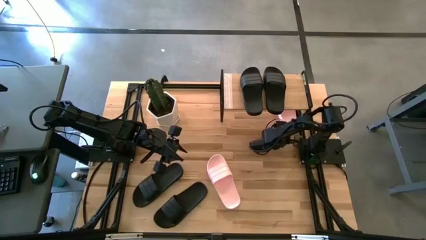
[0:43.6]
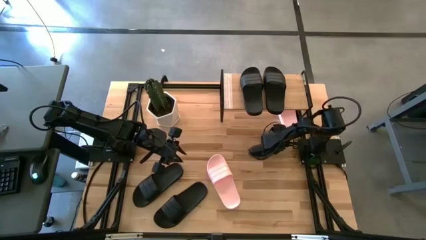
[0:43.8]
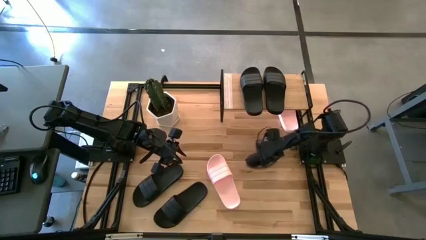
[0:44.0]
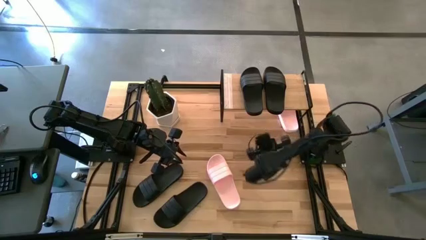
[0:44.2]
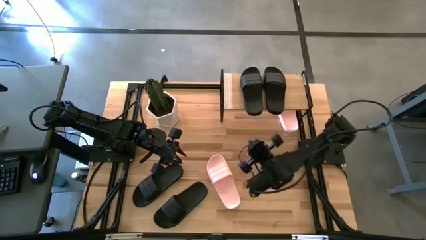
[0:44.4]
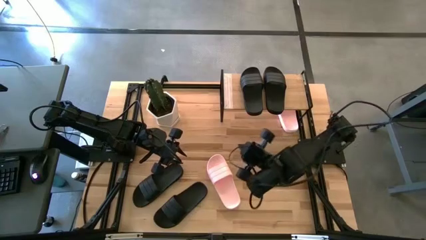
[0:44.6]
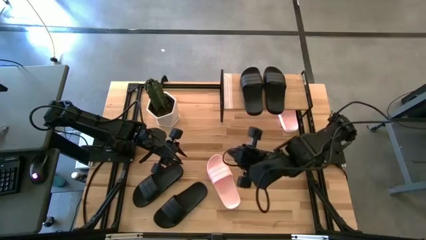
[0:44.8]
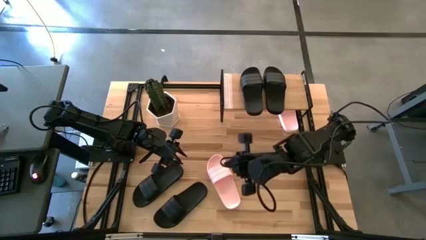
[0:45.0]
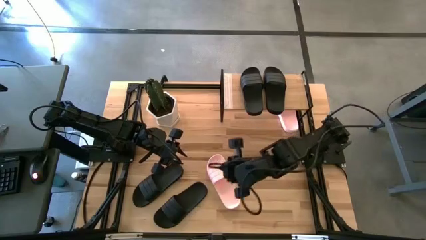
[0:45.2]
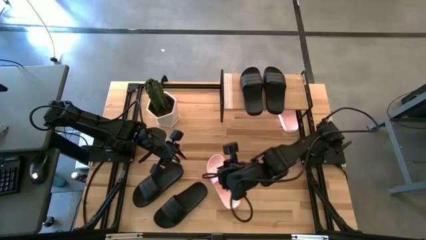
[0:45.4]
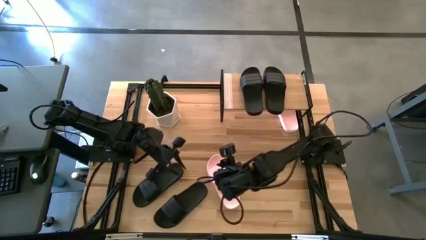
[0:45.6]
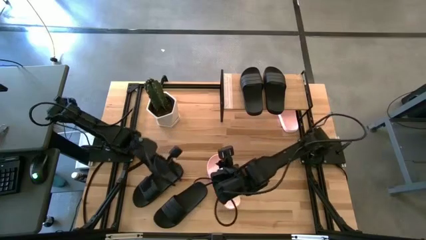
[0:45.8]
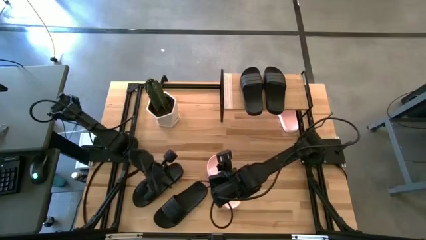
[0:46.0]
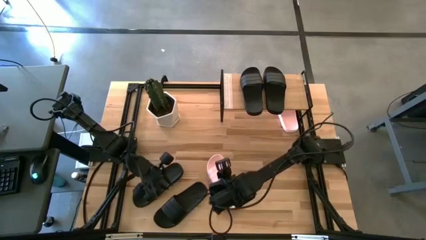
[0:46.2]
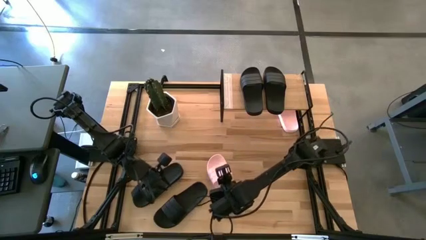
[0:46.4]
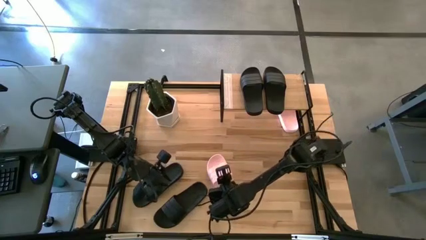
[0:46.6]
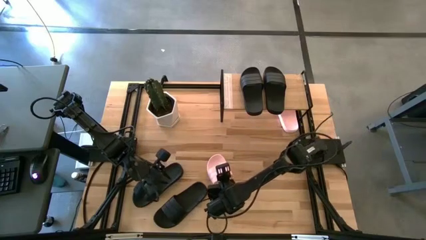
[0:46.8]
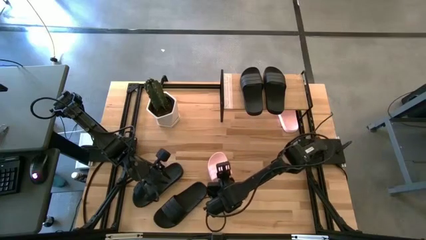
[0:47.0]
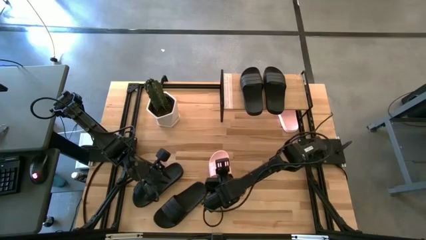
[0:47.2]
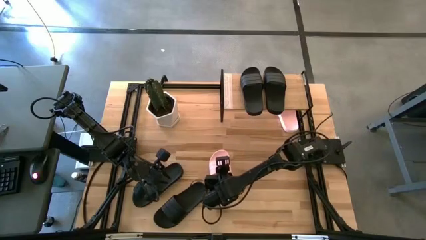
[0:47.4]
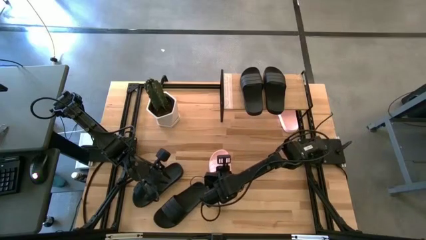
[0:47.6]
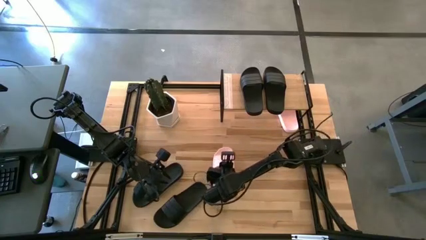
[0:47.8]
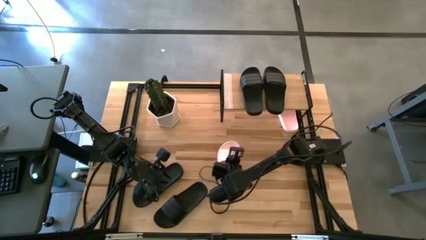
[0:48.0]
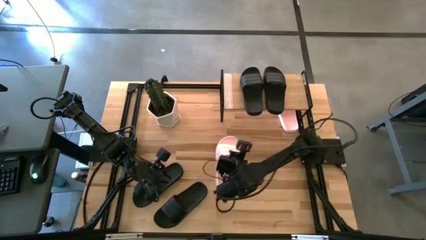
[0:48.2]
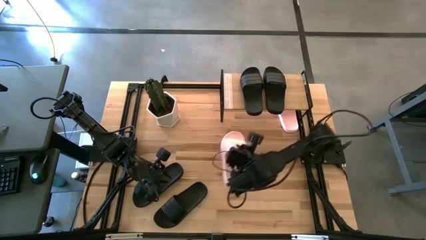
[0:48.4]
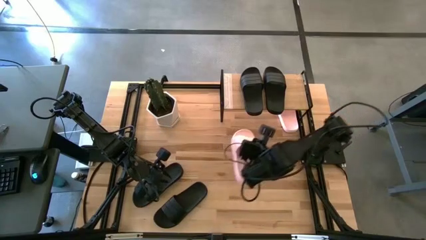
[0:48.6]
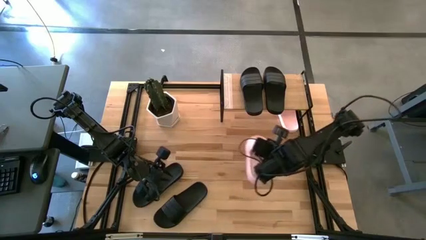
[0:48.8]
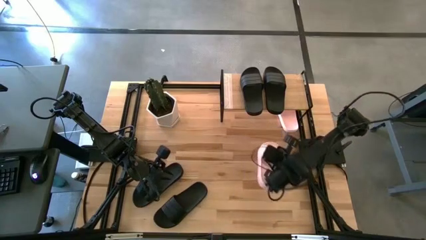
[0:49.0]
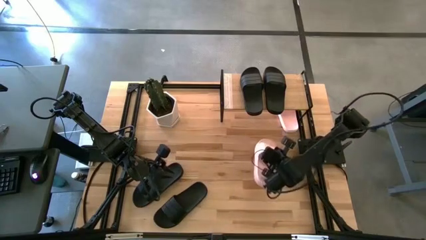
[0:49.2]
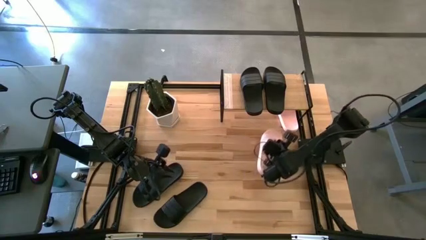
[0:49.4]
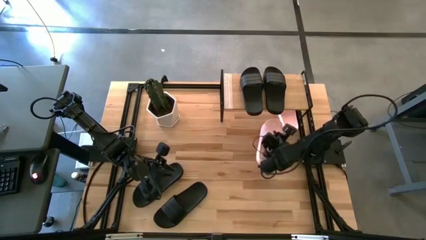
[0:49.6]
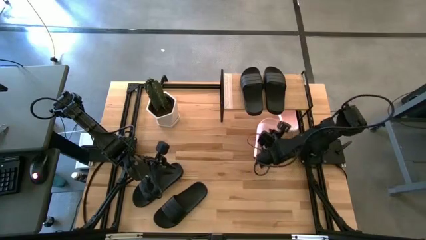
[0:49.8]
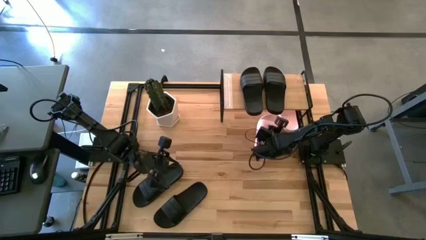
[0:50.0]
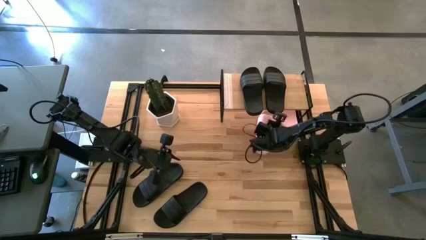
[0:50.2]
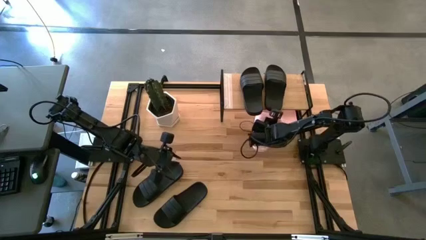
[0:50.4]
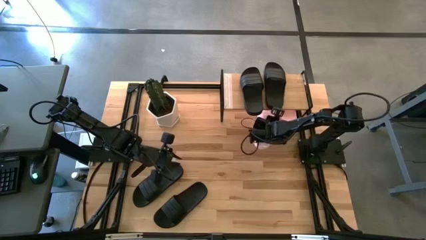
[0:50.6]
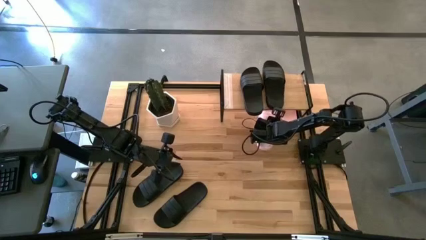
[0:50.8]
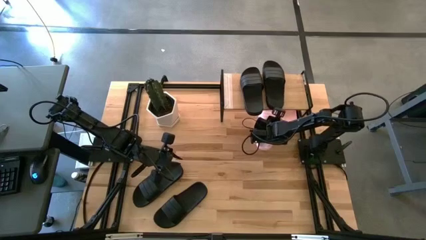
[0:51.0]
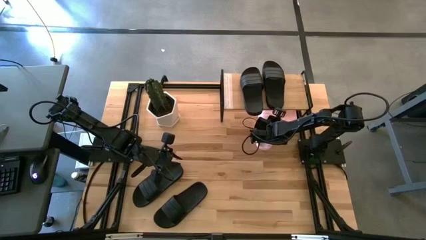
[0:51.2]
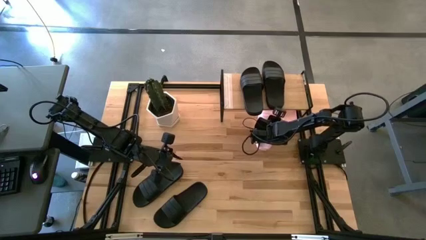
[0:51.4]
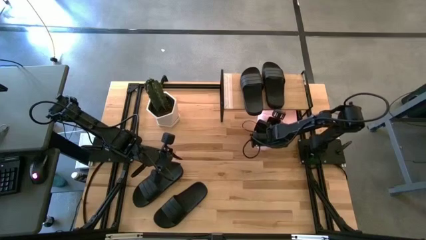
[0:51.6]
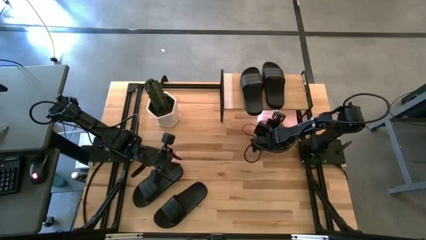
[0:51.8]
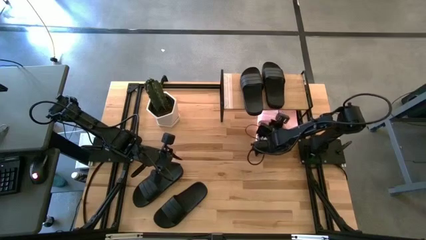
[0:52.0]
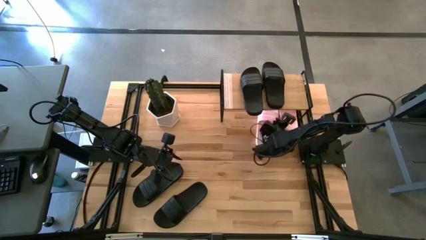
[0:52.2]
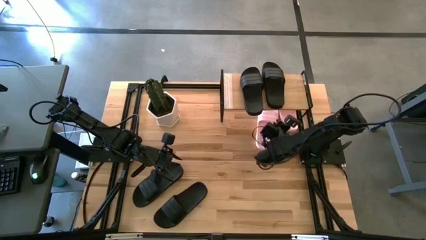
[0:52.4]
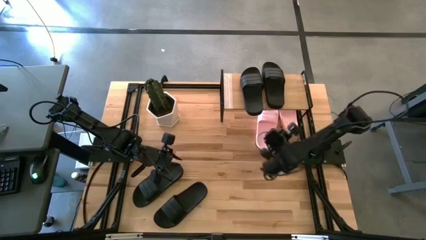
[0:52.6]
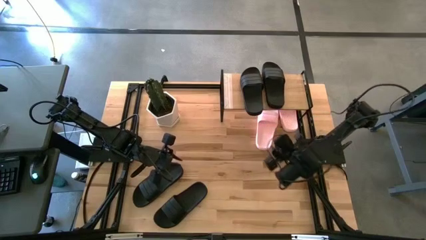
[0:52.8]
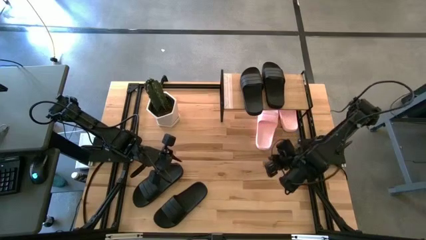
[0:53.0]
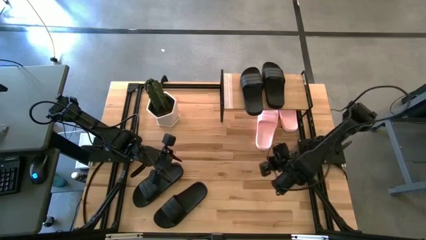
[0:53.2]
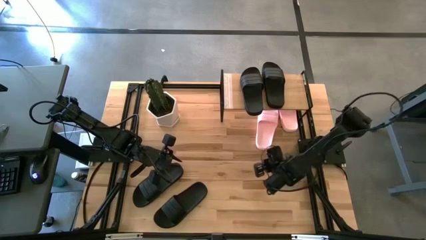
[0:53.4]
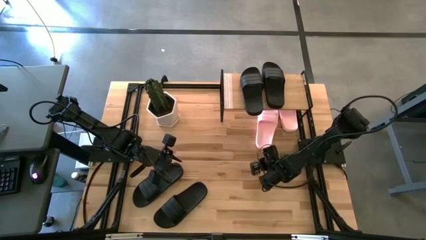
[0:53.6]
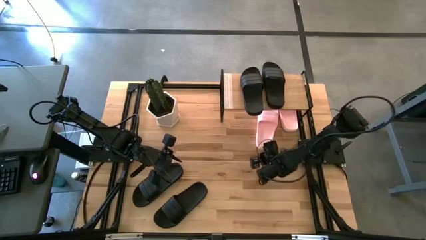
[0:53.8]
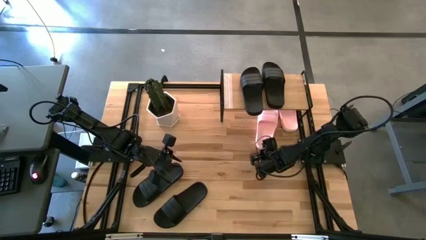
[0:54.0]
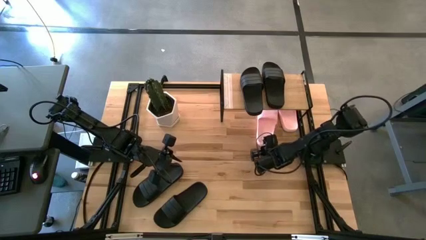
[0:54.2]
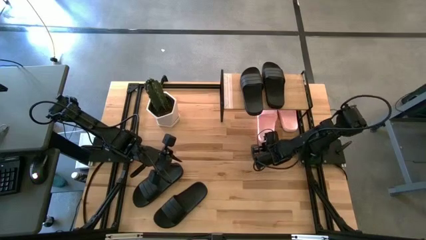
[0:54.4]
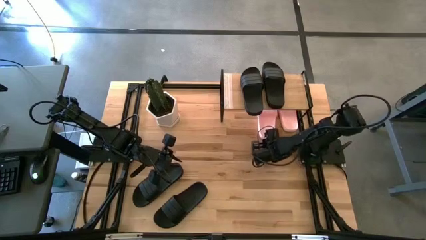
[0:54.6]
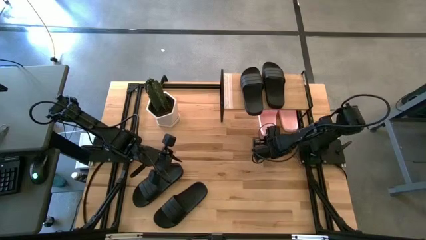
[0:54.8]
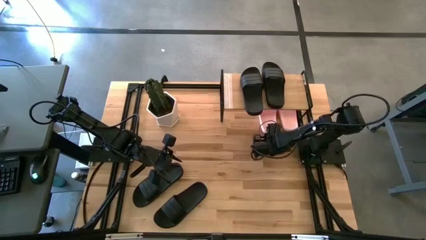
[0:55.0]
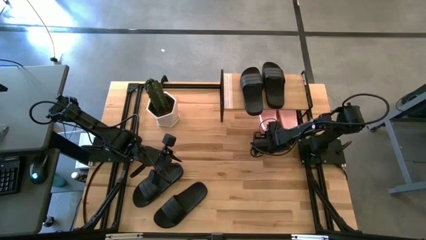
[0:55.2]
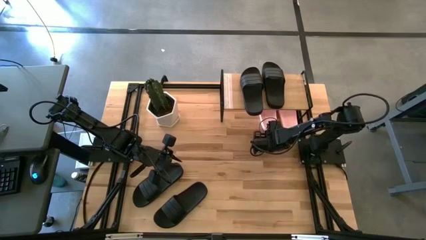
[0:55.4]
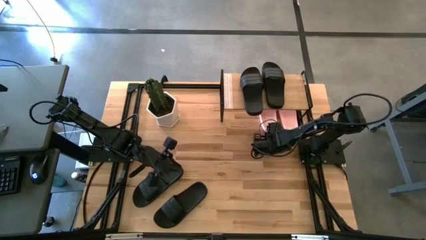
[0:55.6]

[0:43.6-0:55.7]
Task: Pick and place slides into the shelf
Put the pink slipper under the shelf

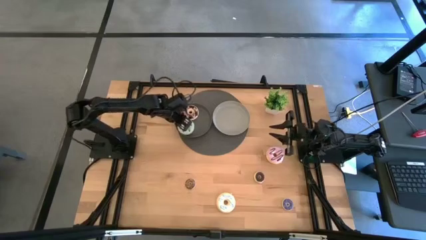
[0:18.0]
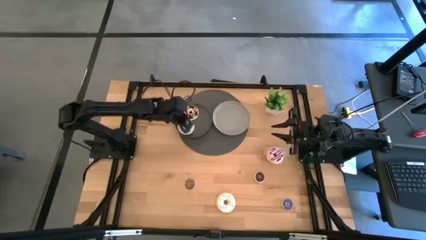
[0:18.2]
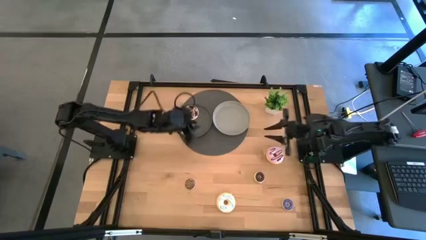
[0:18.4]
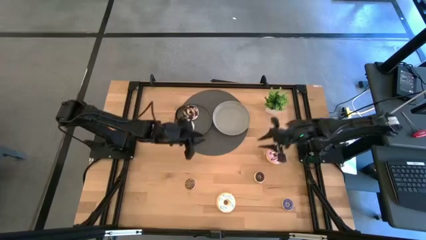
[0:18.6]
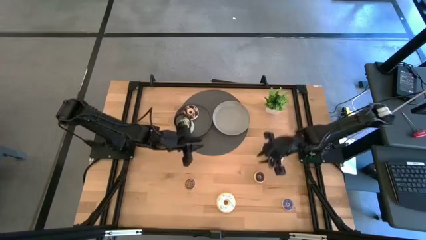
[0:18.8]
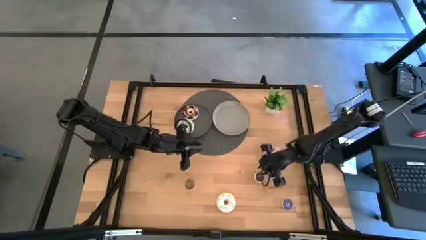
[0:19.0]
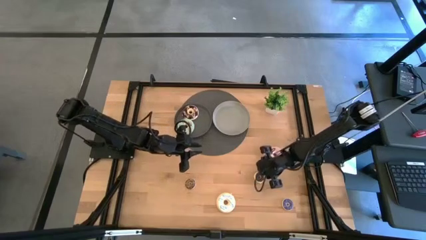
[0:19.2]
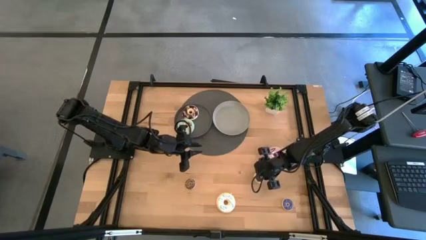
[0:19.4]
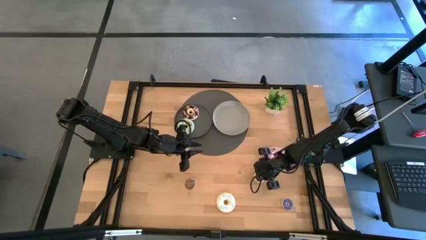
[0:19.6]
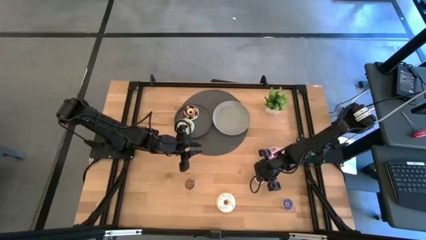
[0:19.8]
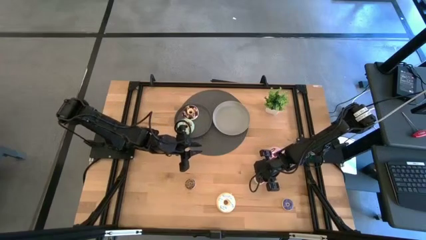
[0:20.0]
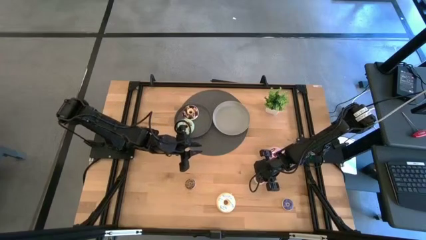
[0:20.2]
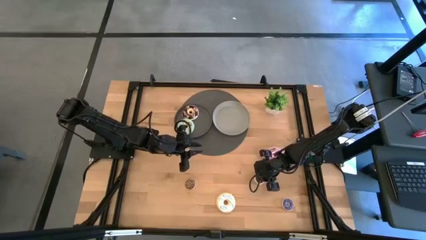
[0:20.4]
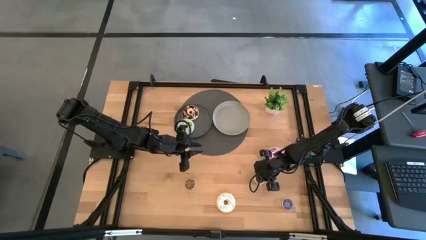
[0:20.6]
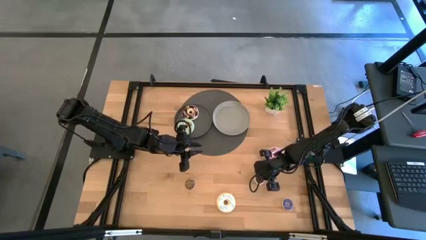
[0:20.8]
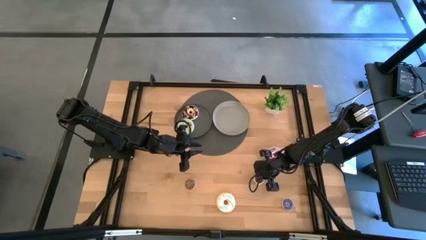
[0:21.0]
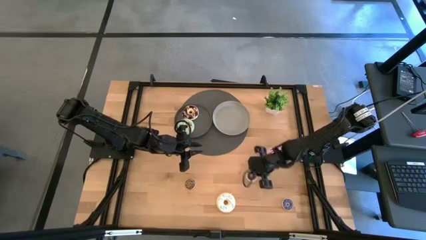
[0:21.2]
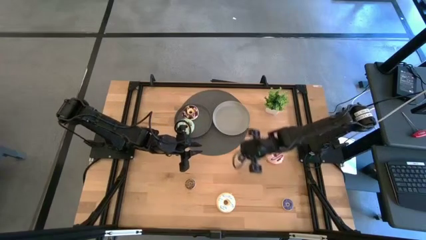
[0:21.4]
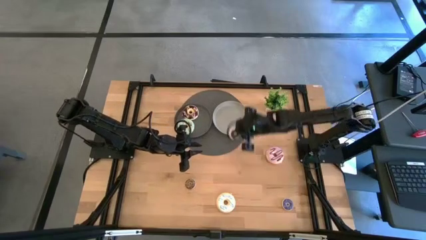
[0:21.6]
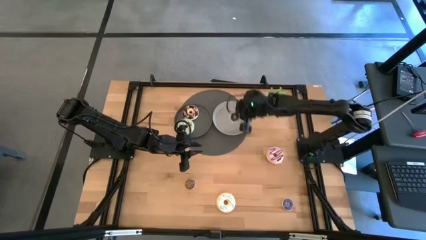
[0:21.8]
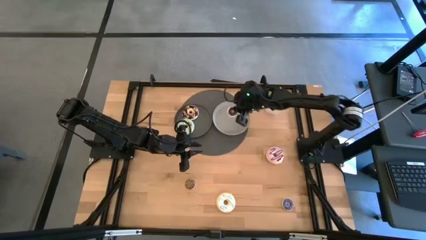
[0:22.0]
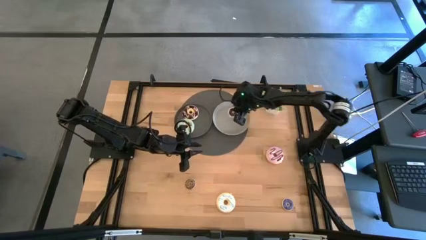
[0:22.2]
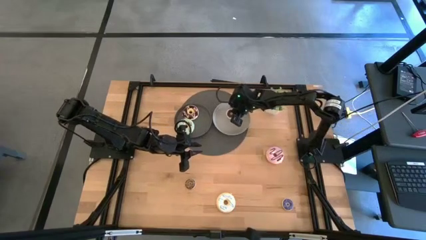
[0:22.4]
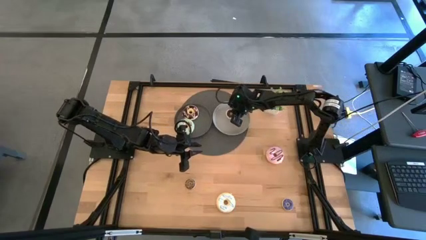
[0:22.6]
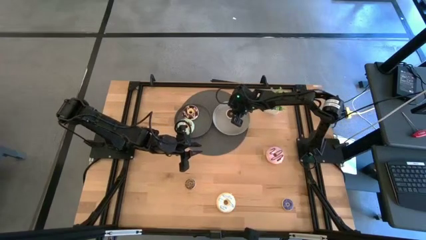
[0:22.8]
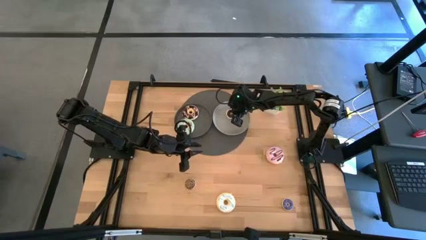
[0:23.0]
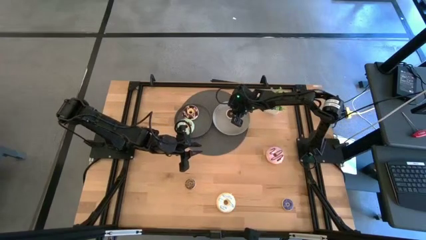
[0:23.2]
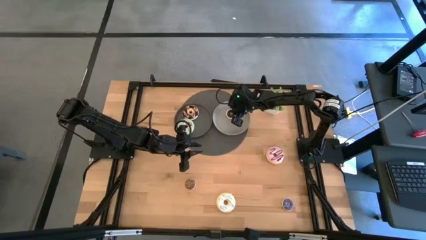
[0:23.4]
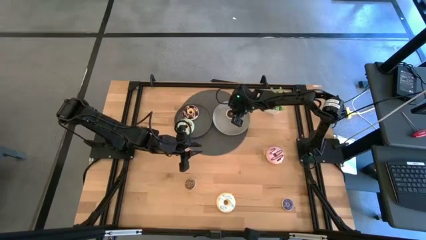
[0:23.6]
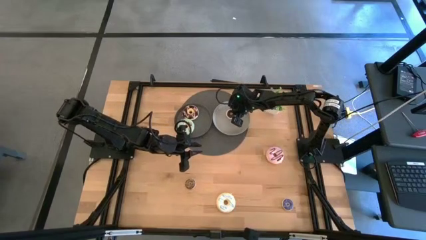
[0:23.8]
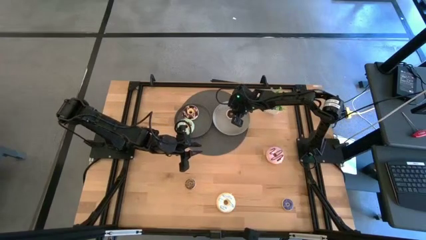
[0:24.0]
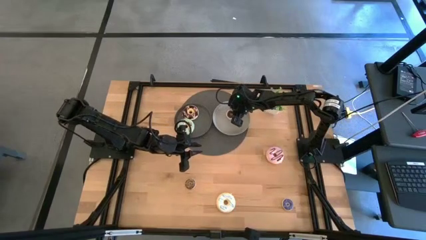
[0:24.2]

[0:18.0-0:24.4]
Task: Pick & Place donuts
Put the small dark brown doughnut on the gray plate
